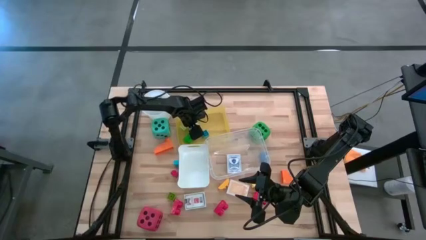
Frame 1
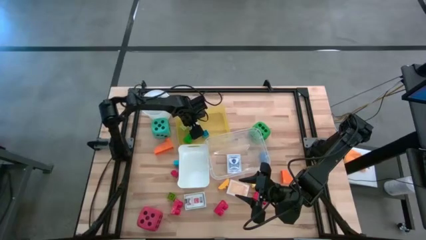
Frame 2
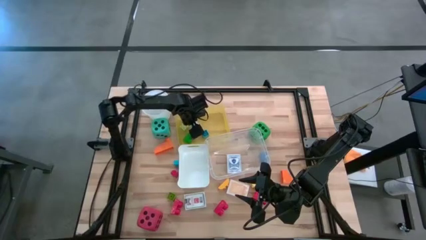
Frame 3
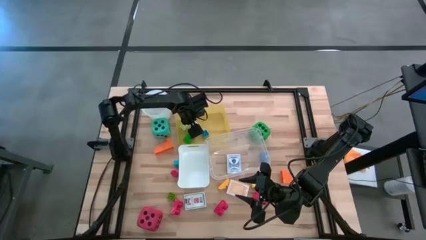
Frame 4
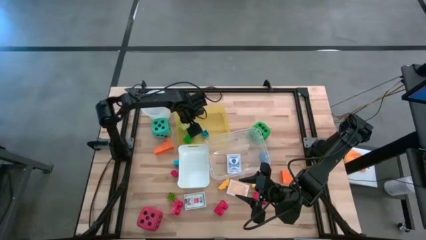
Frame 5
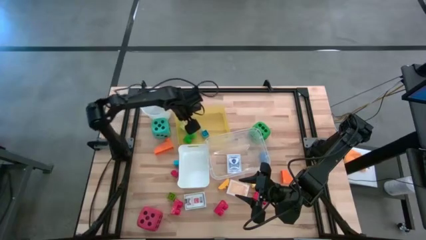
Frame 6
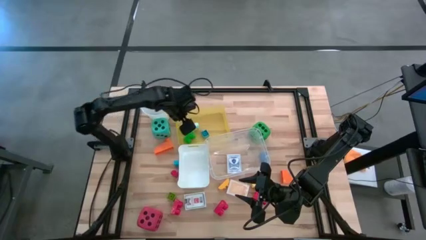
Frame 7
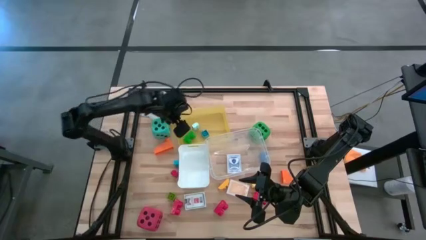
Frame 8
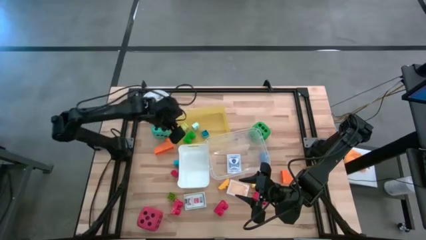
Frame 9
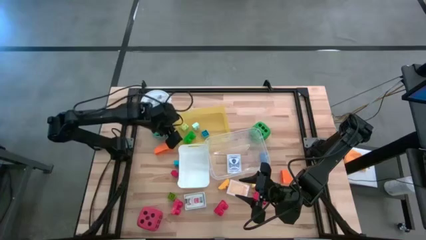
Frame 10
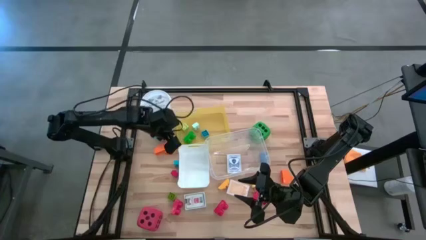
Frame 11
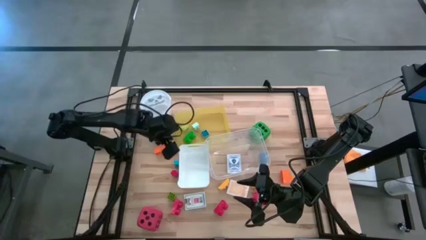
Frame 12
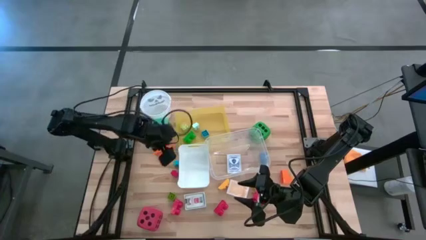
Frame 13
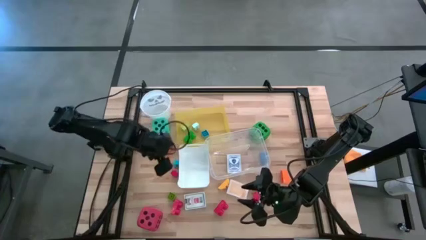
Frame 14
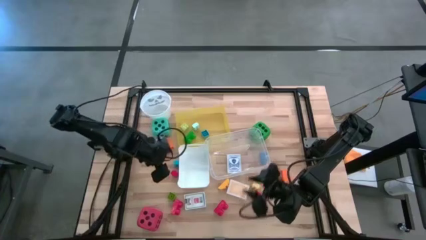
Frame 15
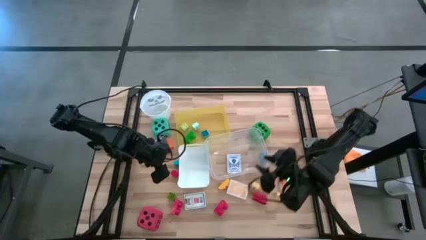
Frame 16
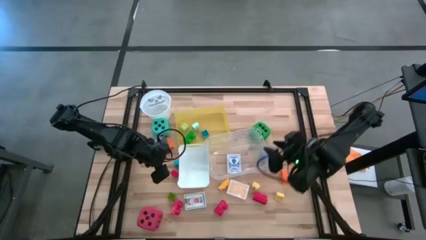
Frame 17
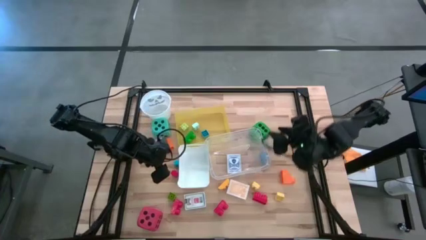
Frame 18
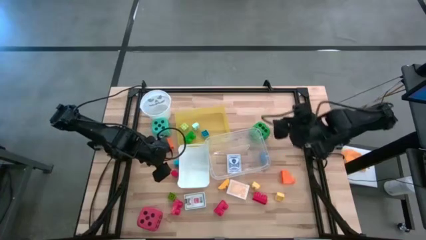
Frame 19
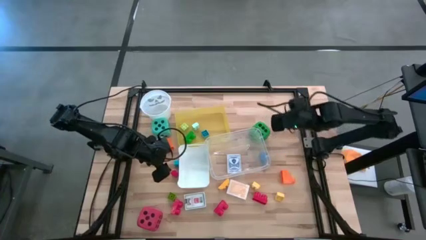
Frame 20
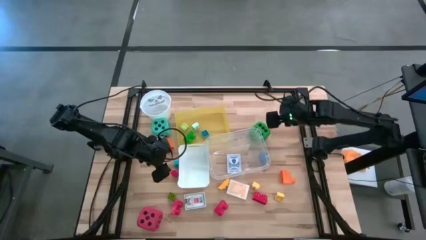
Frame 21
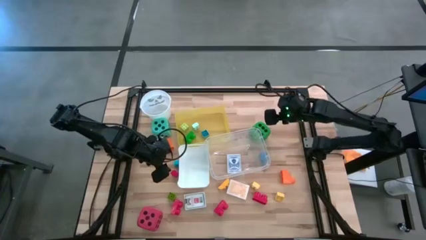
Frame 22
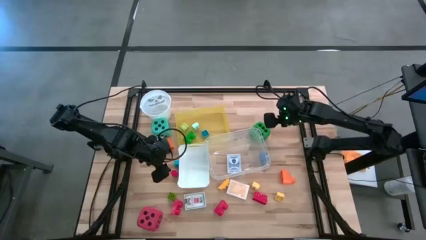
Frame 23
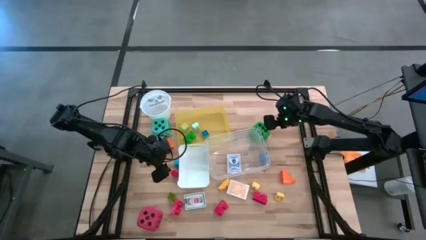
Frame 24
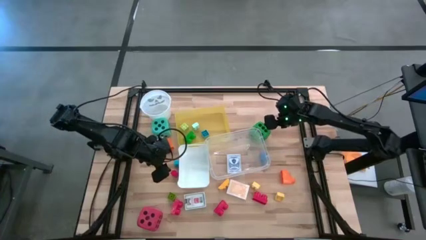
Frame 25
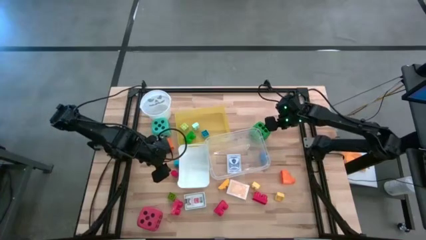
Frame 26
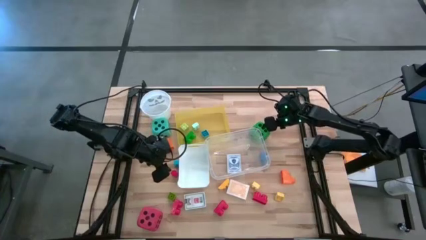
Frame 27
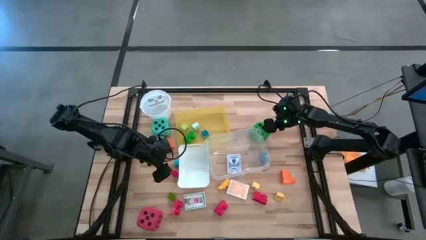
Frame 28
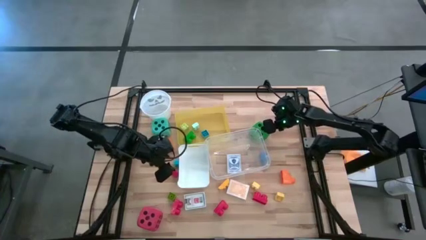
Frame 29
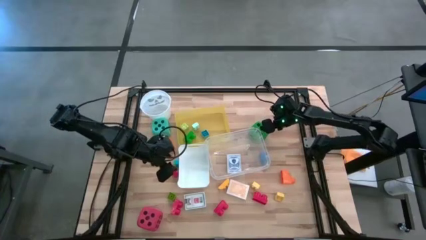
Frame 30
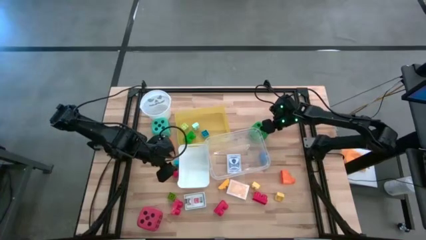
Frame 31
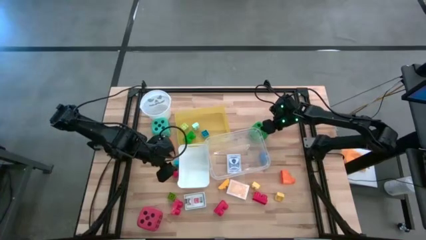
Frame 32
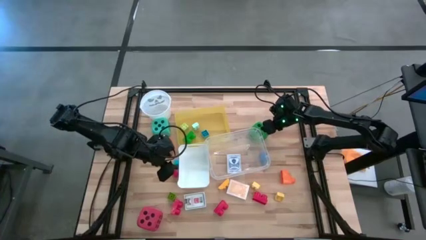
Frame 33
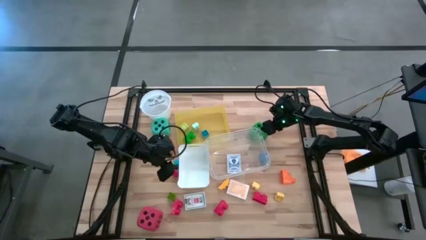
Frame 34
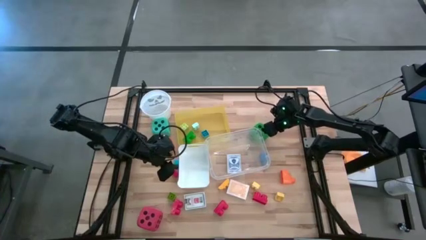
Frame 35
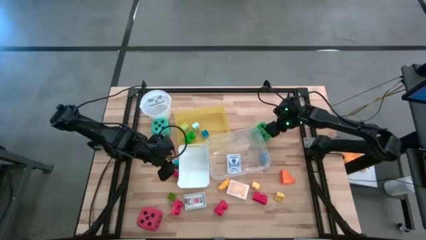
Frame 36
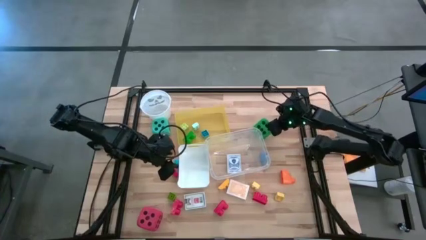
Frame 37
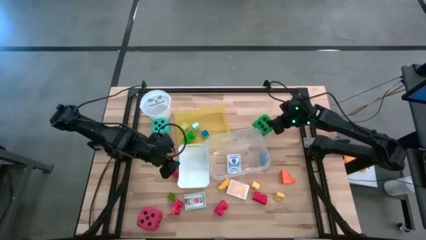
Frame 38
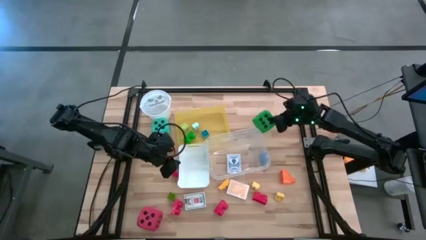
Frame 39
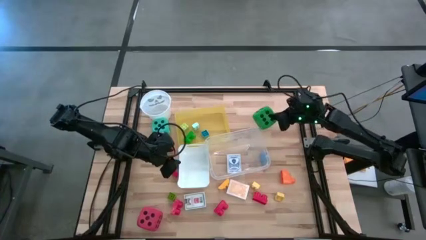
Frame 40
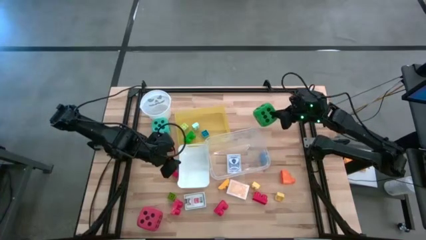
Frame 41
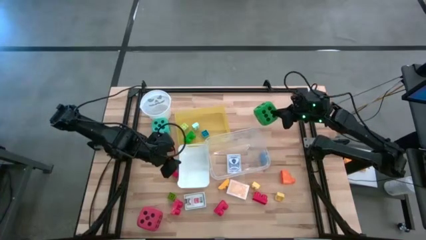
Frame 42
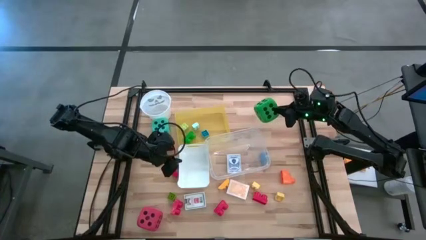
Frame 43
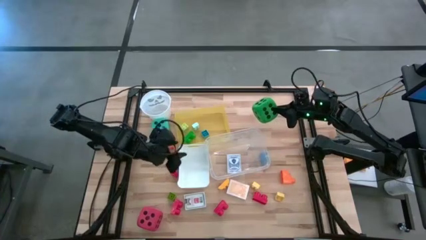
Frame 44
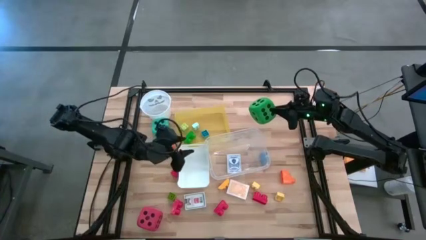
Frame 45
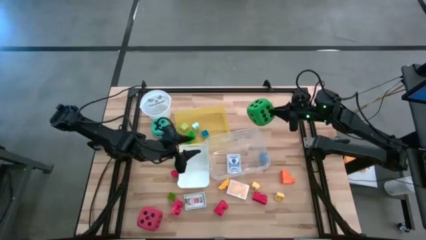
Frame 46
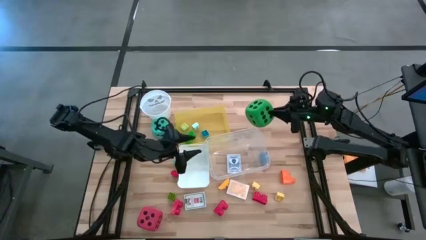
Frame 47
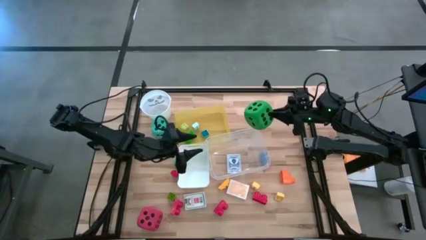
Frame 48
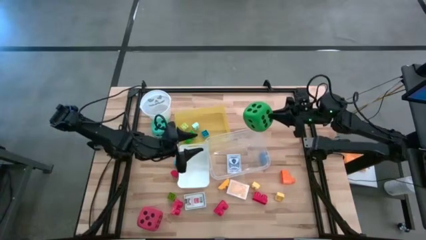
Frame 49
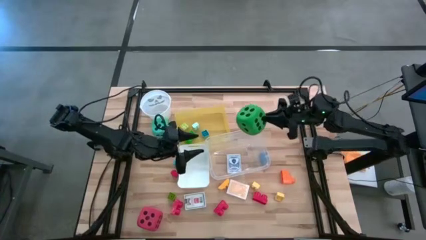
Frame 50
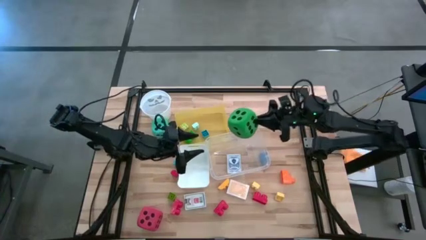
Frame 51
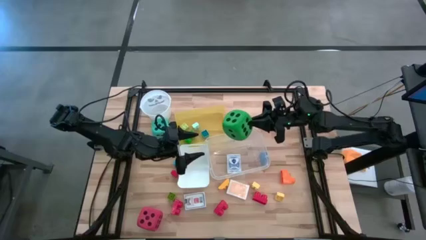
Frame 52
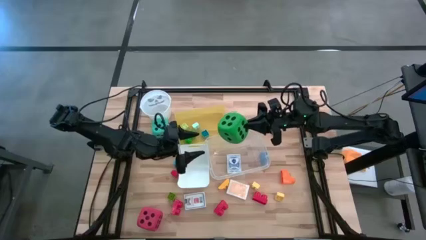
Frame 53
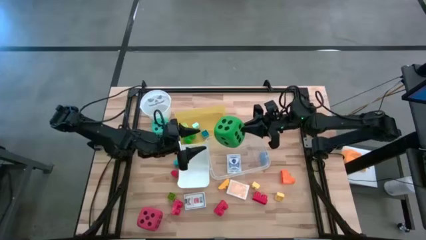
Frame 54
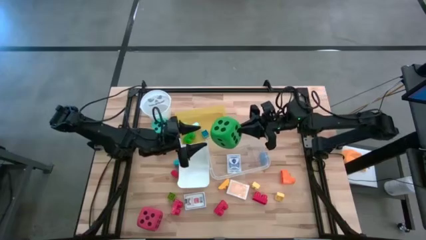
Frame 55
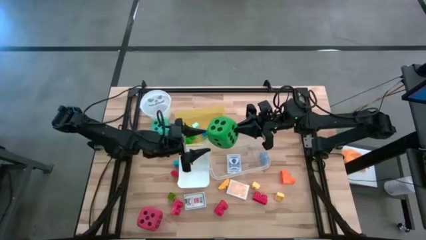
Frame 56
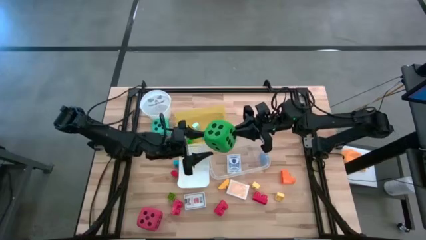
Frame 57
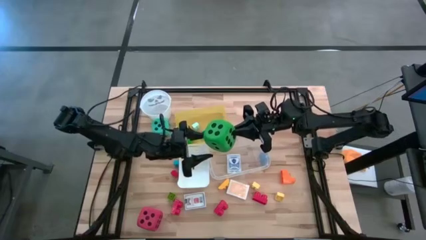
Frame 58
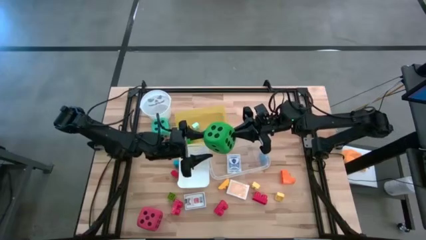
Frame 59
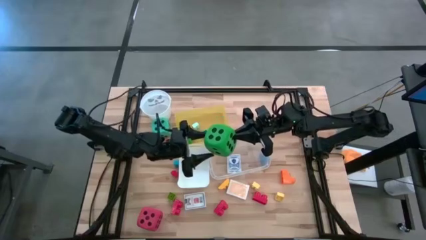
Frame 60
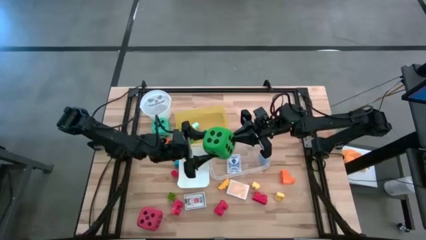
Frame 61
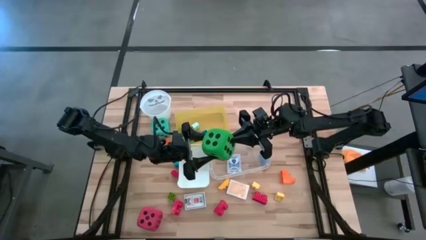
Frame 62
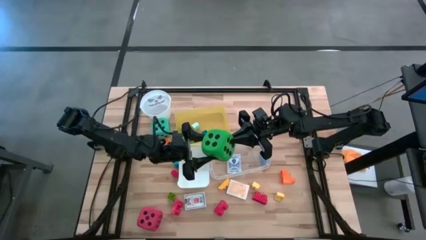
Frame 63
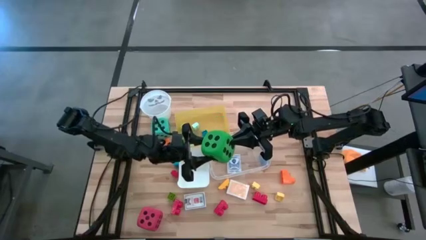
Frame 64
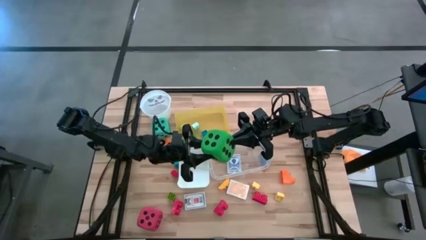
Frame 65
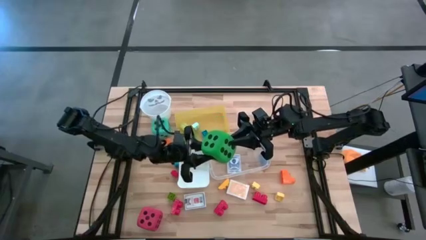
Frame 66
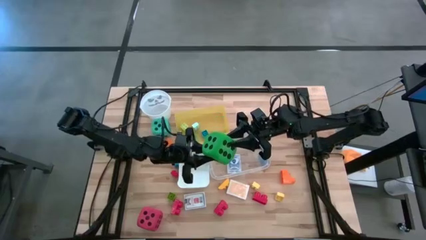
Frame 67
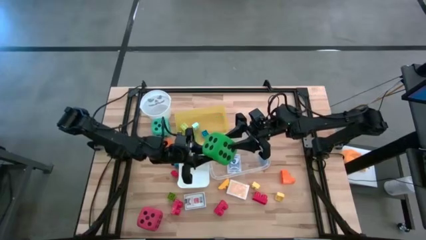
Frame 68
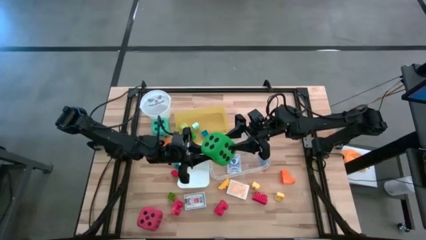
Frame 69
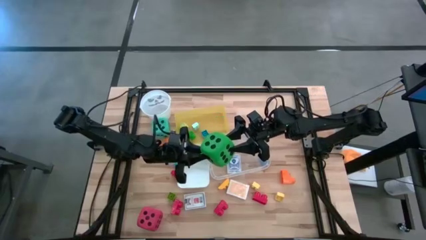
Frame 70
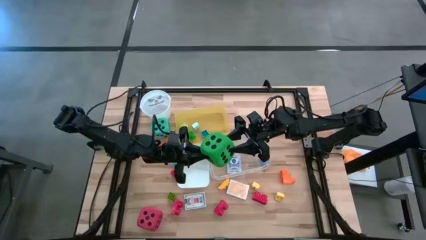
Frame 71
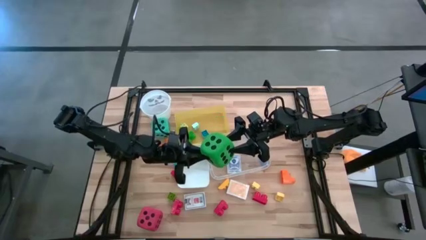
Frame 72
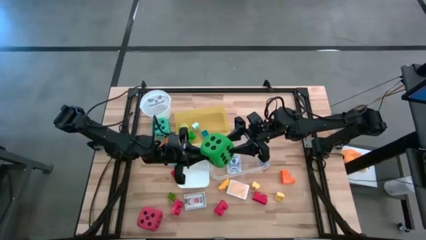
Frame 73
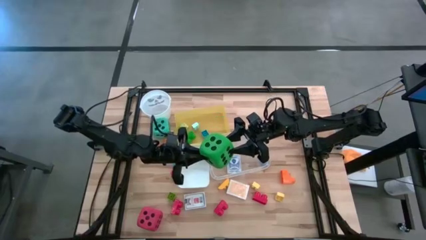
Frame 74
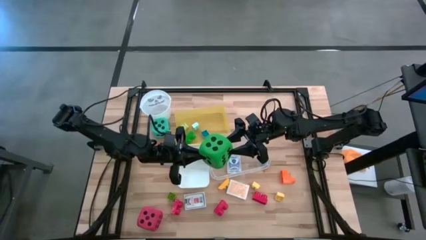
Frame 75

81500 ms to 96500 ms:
Task: Pick & Place Toys
Put the green dice into the white bin
